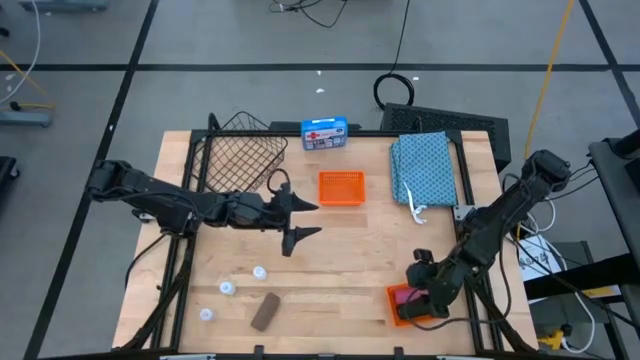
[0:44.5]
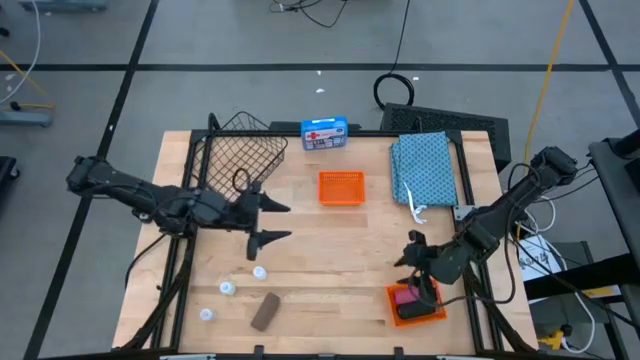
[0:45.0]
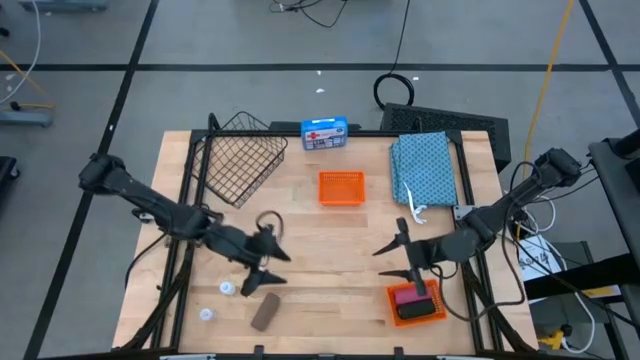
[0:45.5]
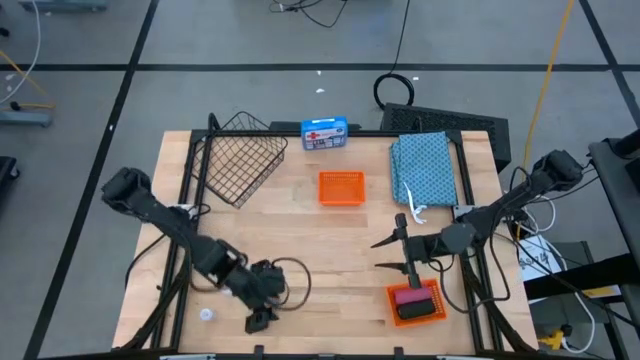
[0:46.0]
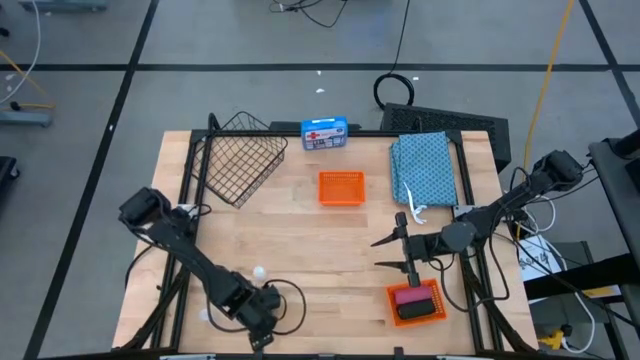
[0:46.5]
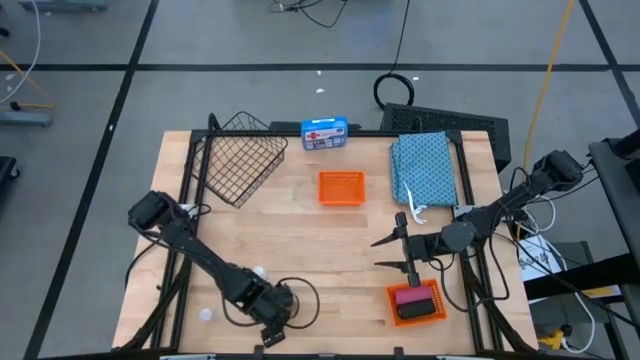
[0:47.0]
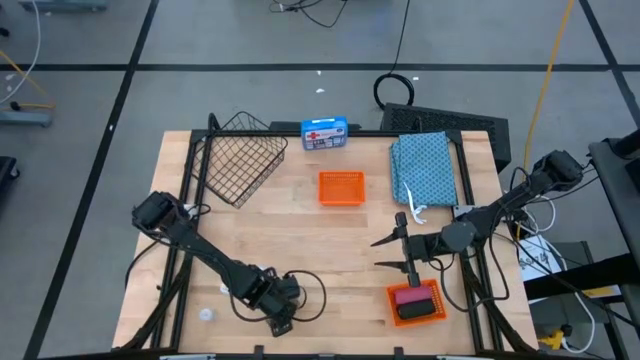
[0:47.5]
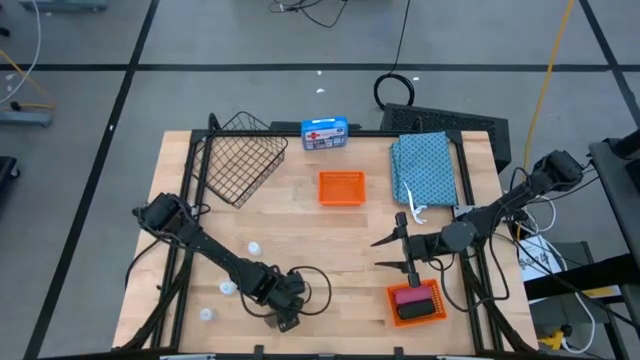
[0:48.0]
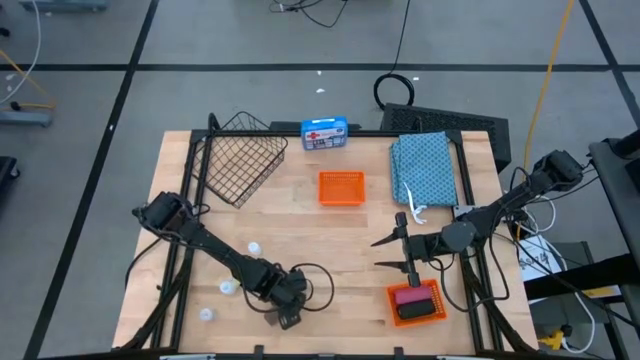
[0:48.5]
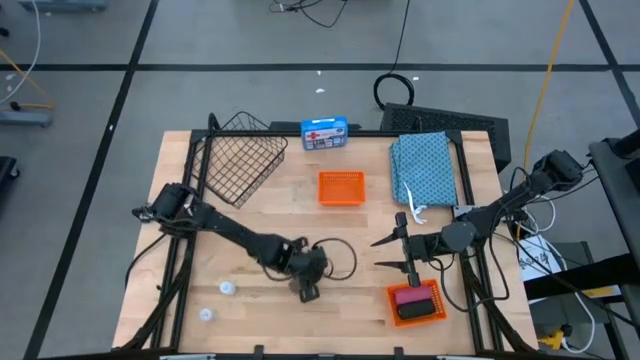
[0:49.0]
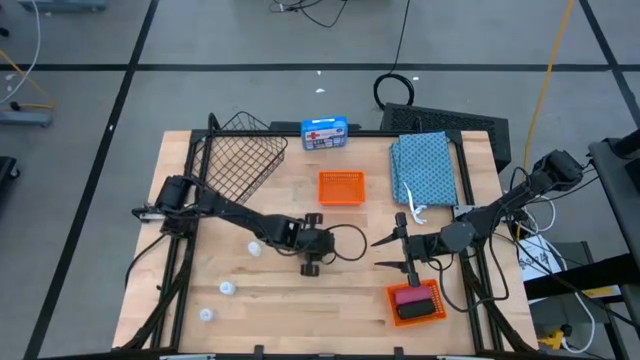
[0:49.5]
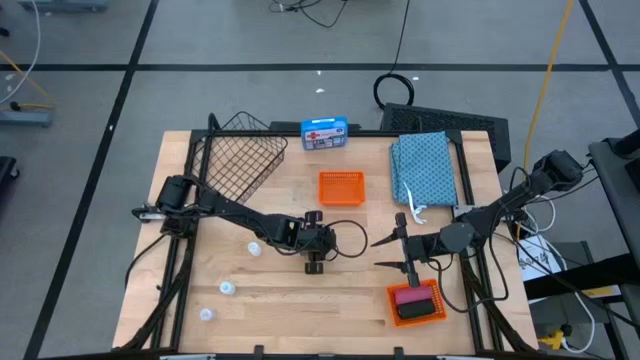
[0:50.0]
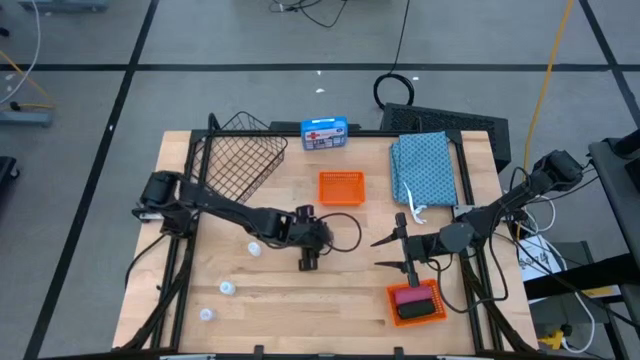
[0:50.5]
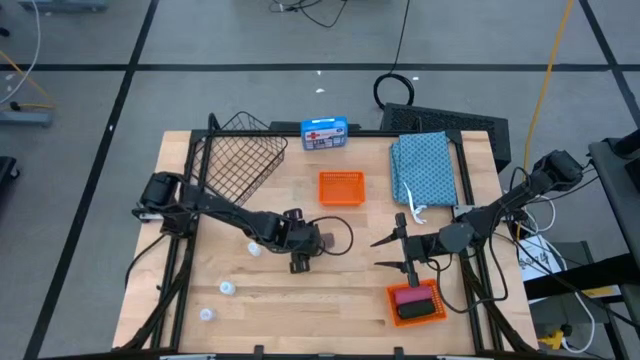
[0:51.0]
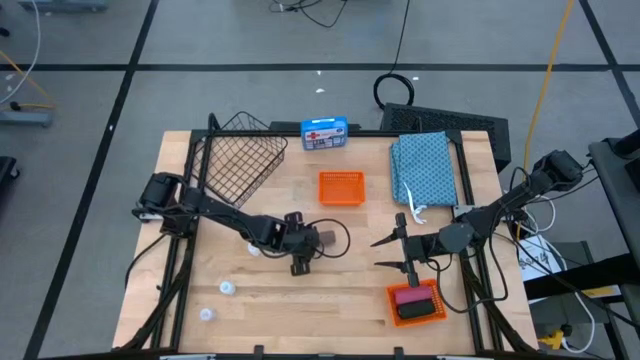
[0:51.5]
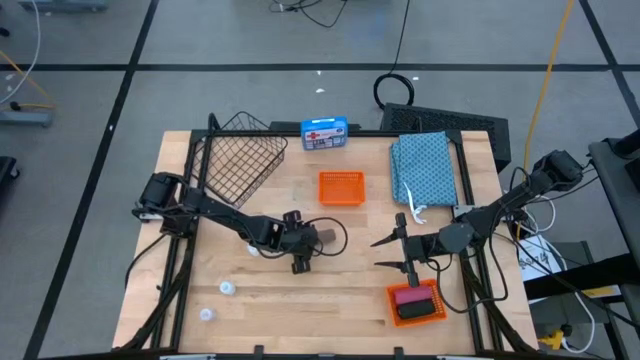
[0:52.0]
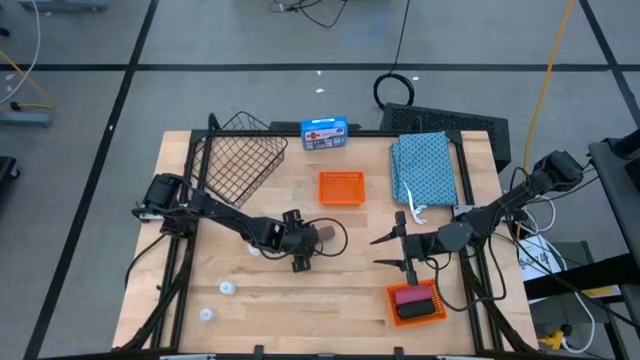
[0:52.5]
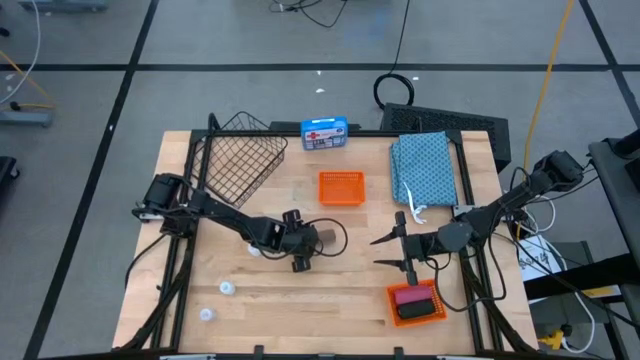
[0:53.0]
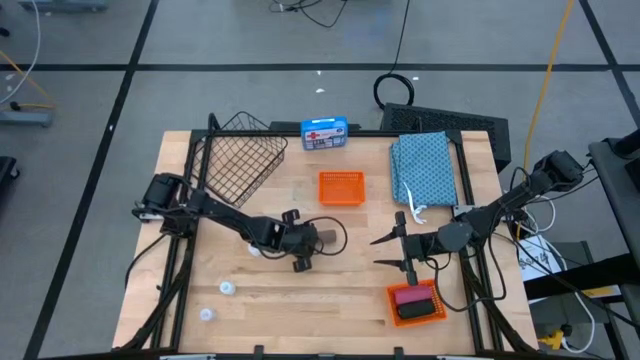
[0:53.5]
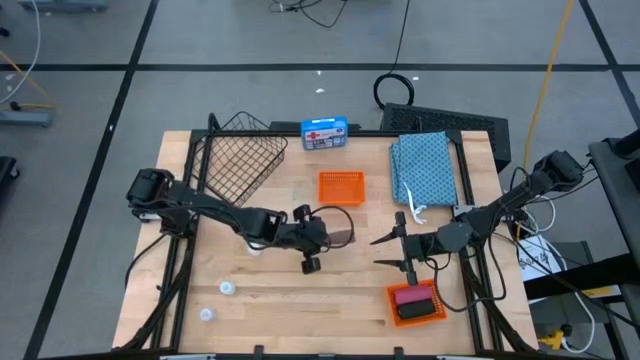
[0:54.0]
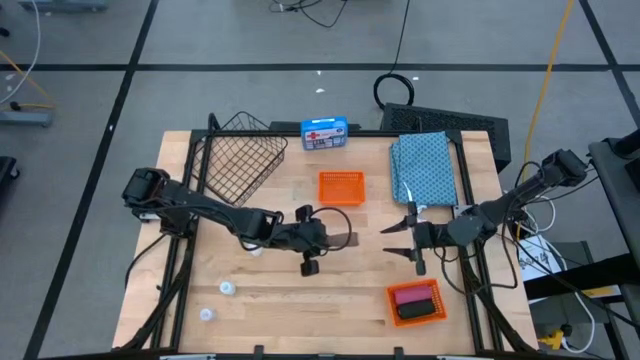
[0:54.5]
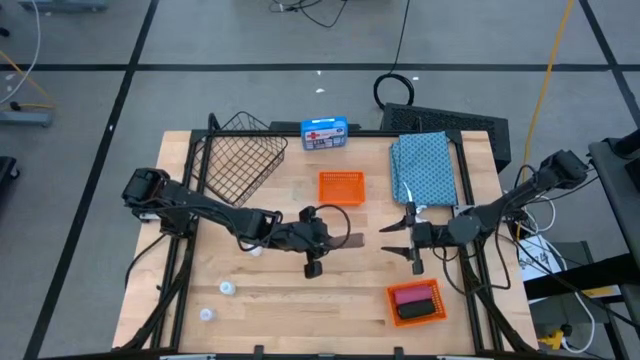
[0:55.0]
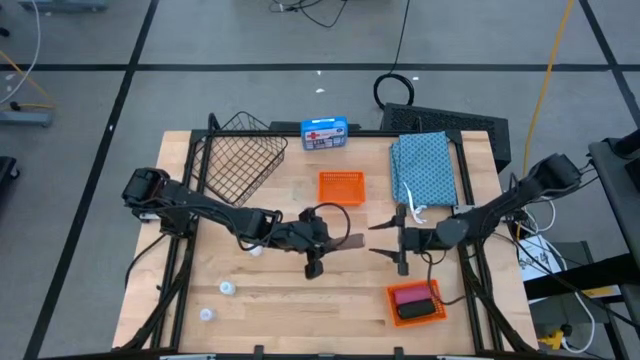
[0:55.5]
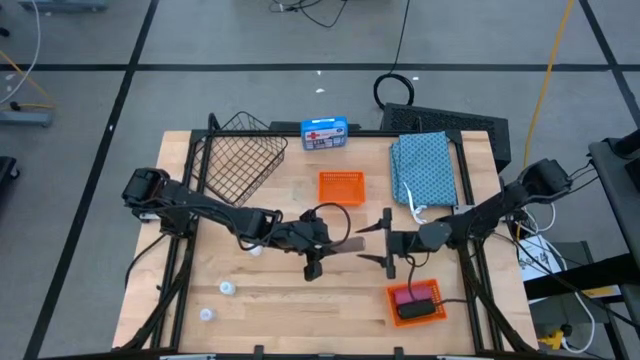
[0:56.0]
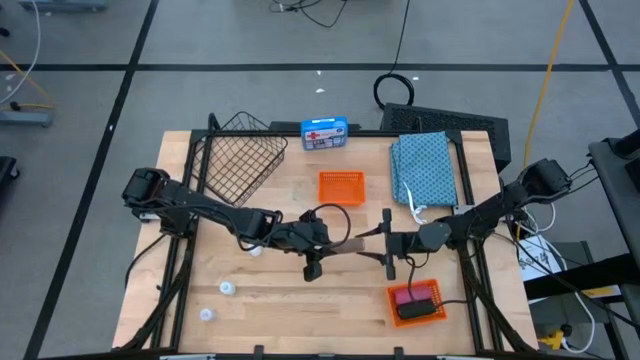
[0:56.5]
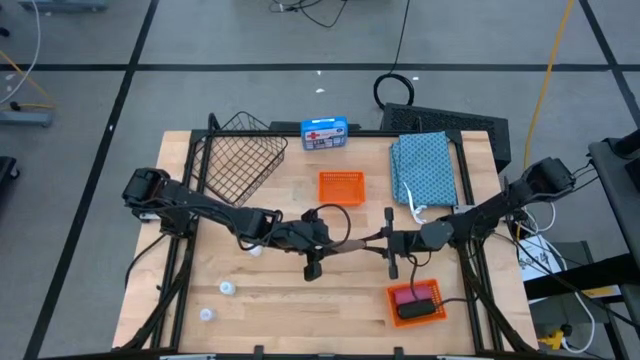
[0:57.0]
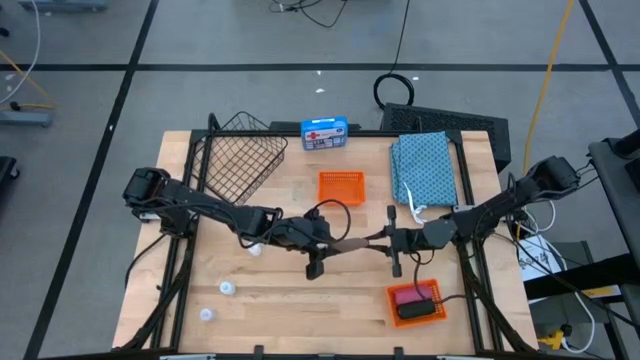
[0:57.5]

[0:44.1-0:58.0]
Task: Pick & place medical supplies in basket/bin
Put the brown bandage into the bottom orange bin

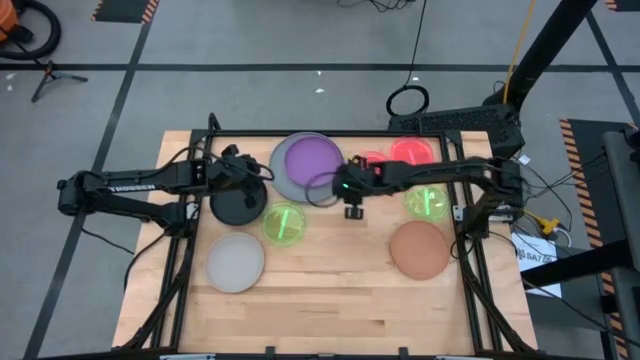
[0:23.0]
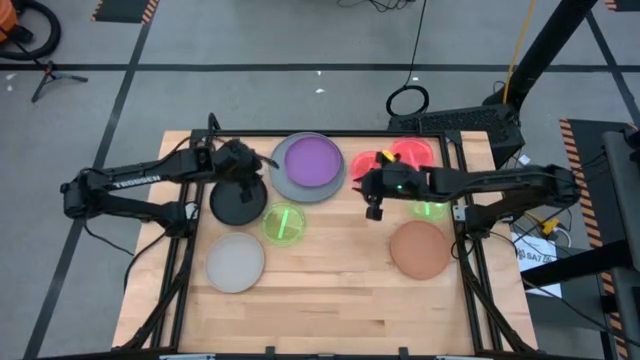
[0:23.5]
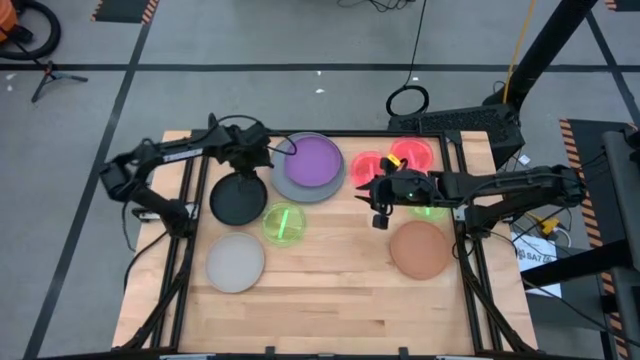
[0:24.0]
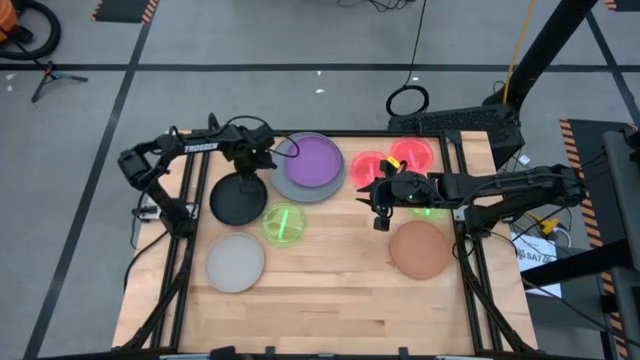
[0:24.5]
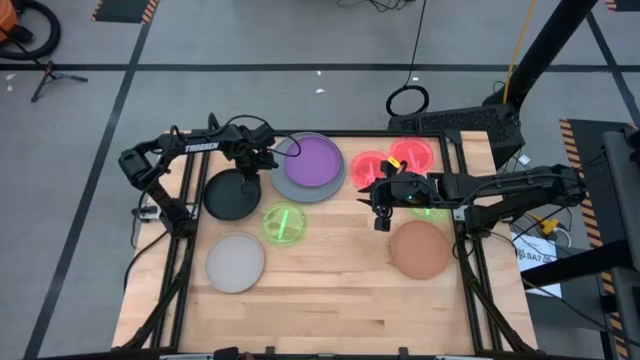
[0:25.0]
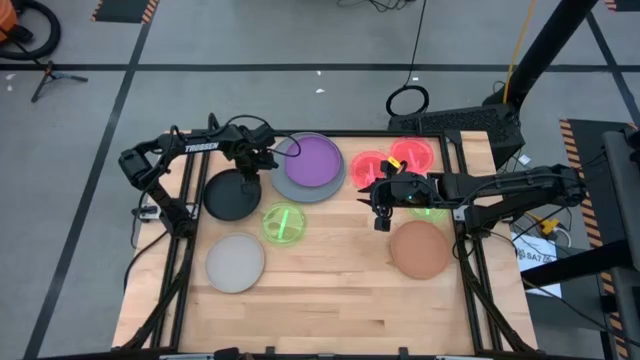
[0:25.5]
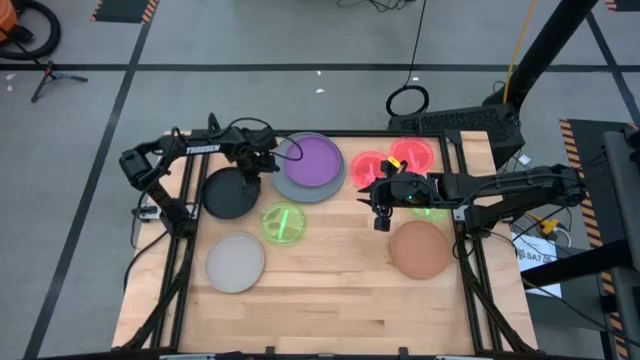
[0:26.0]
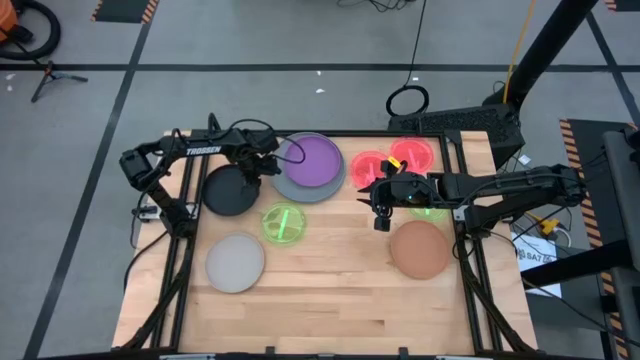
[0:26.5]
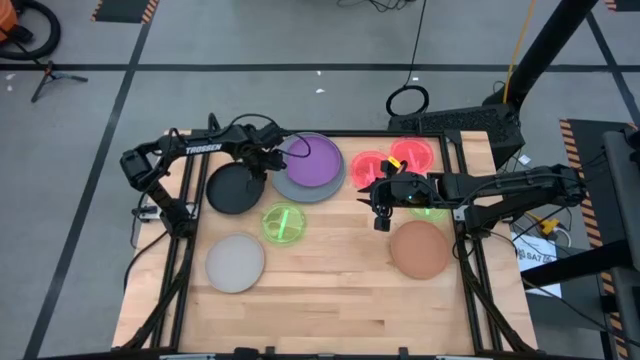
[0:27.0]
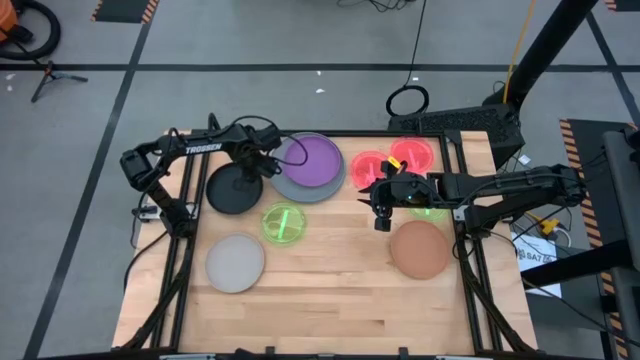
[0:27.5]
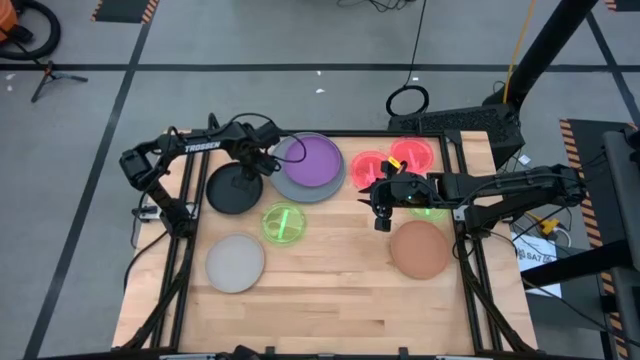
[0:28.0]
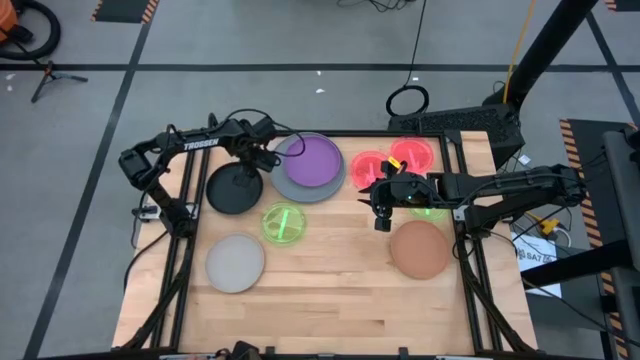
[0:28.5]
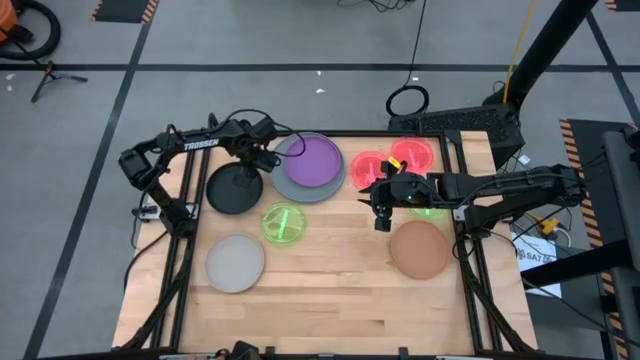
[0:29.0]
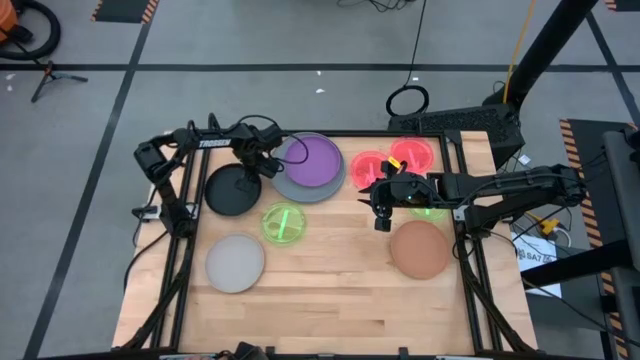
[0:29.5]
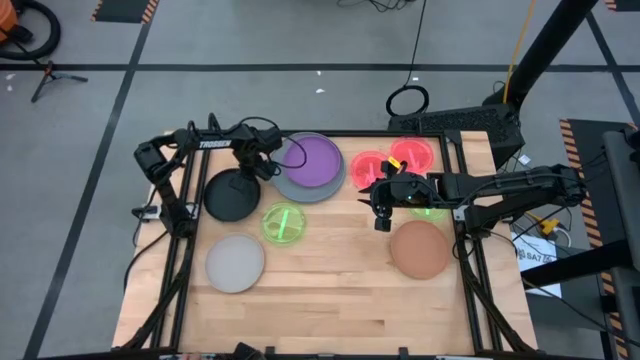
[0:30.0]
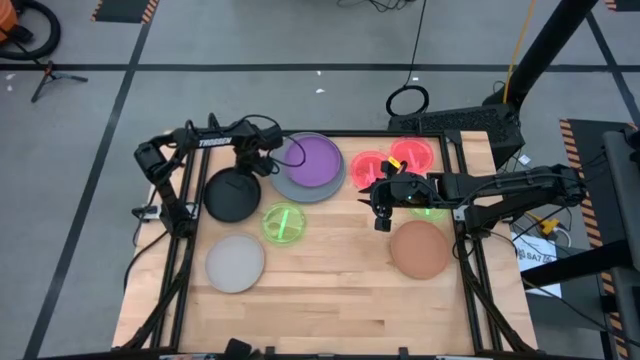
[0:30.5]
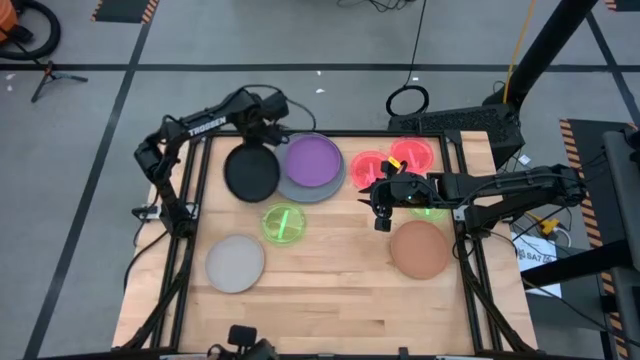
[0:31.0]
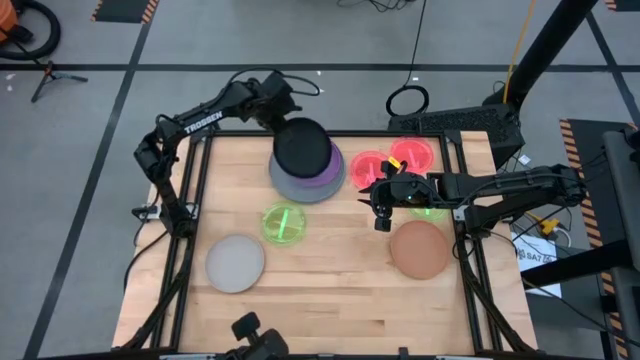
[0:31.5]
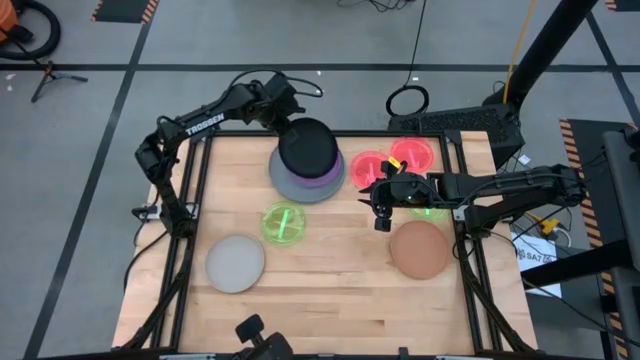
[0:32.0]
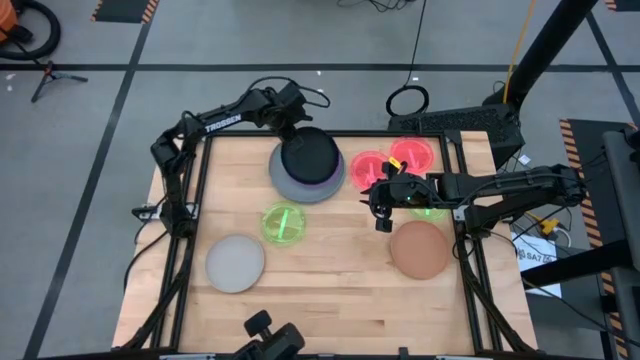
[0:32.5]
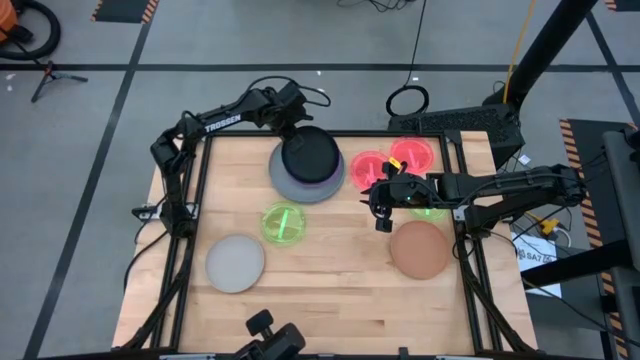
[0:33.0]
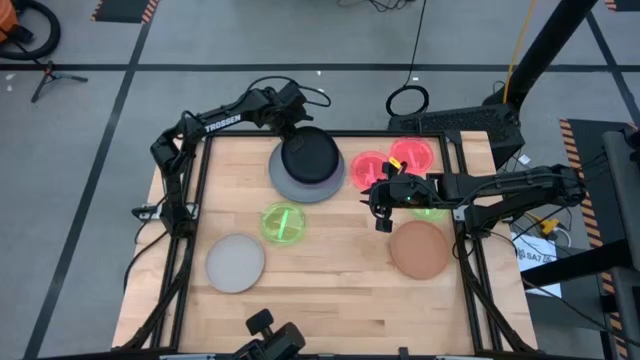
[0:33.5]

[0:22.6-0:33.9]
Task: Stack plastic plates
Stack the black plate on top of the purple plate
